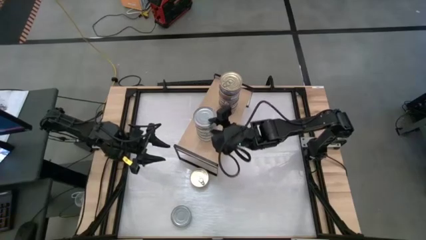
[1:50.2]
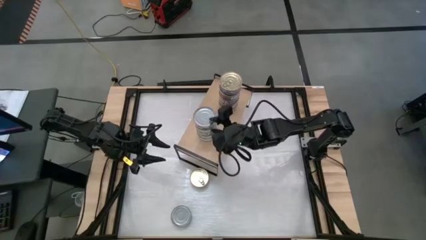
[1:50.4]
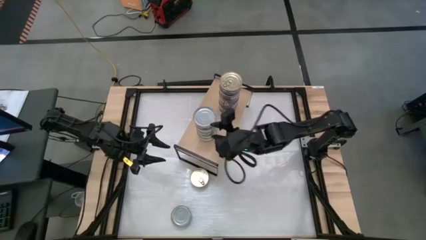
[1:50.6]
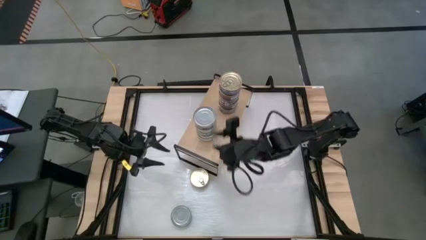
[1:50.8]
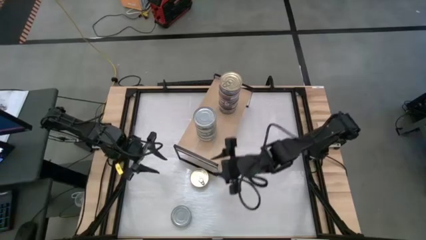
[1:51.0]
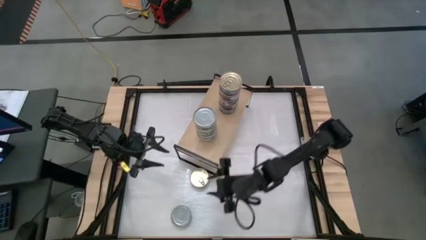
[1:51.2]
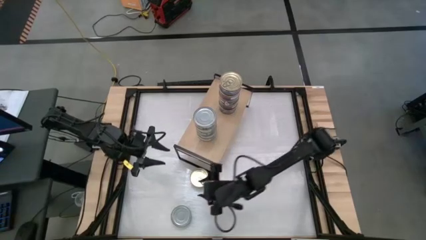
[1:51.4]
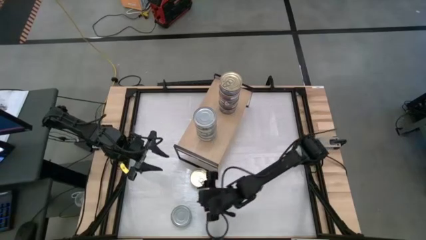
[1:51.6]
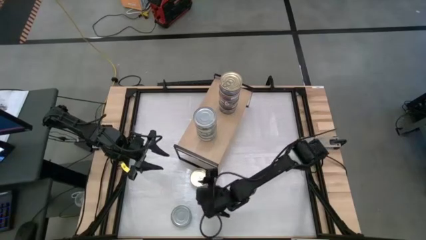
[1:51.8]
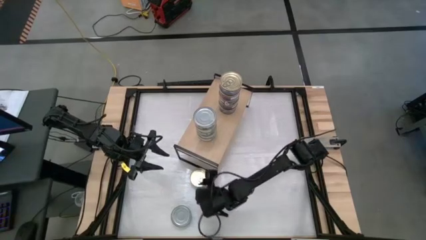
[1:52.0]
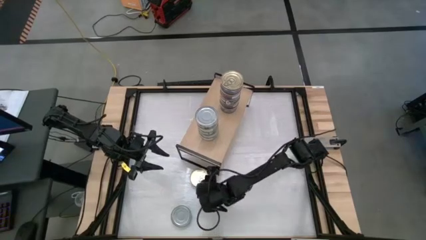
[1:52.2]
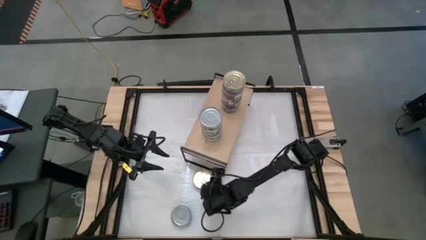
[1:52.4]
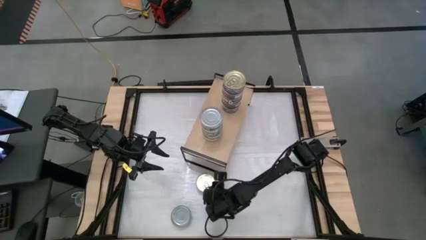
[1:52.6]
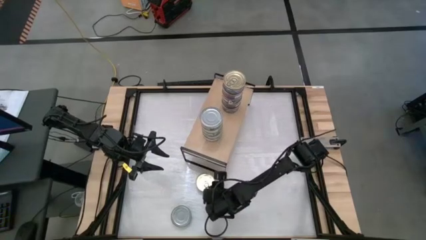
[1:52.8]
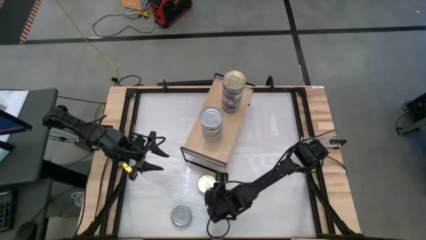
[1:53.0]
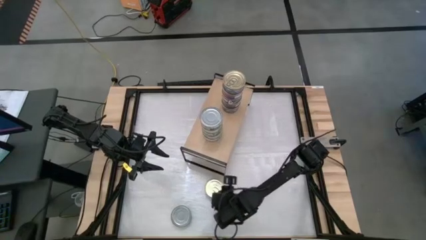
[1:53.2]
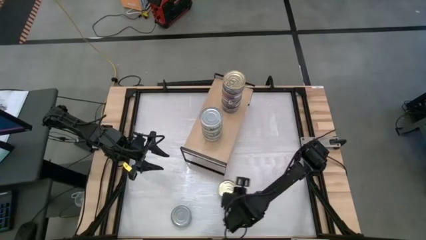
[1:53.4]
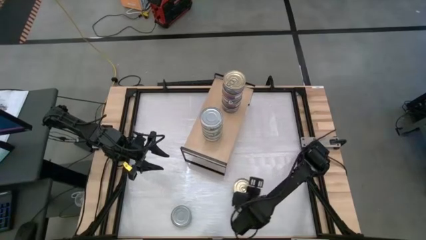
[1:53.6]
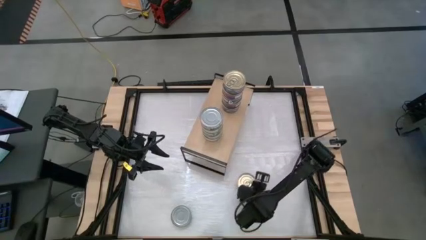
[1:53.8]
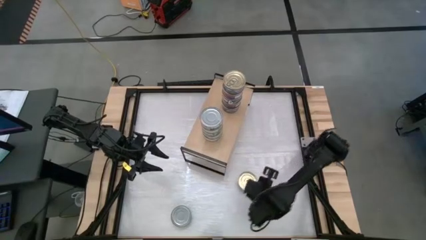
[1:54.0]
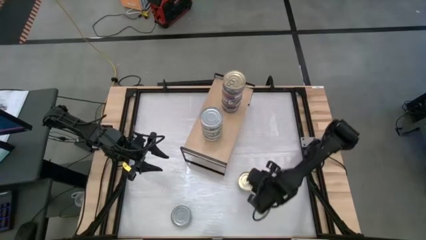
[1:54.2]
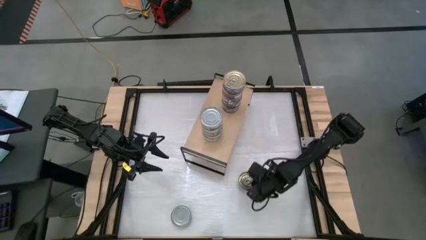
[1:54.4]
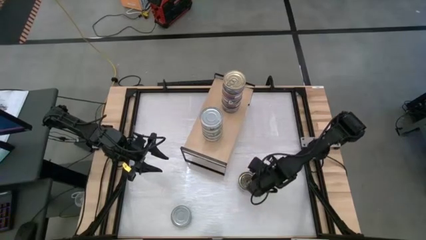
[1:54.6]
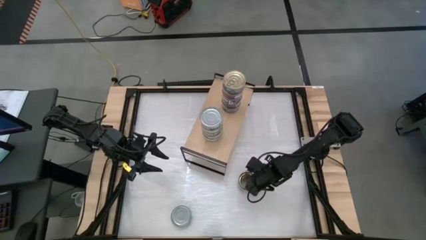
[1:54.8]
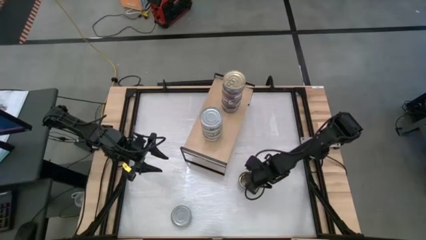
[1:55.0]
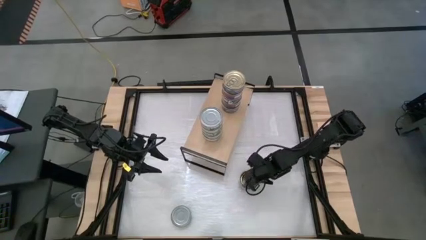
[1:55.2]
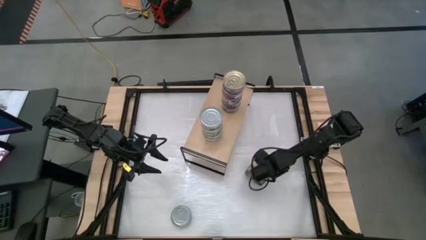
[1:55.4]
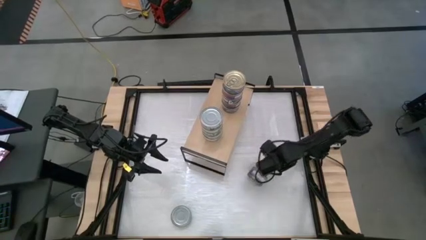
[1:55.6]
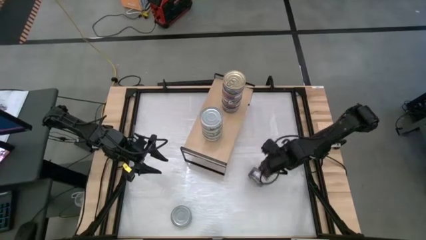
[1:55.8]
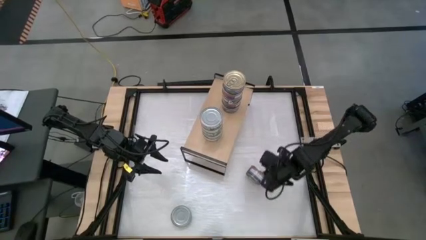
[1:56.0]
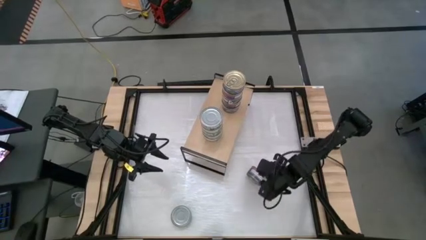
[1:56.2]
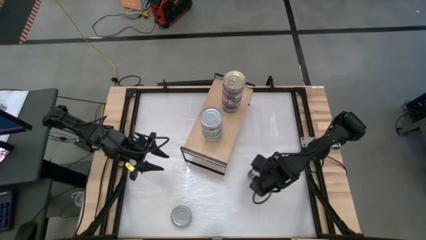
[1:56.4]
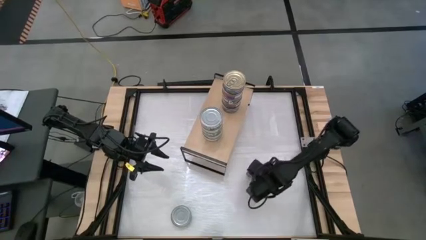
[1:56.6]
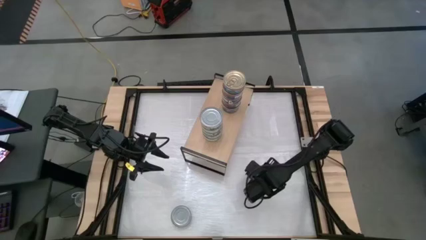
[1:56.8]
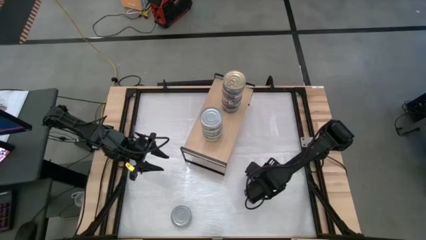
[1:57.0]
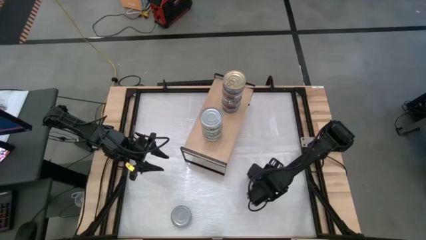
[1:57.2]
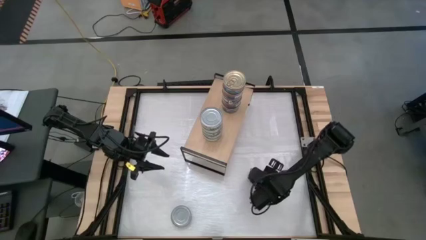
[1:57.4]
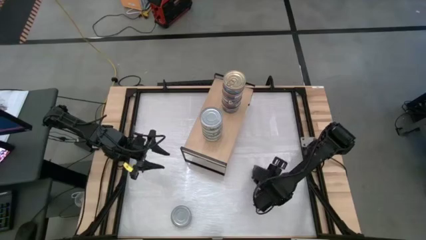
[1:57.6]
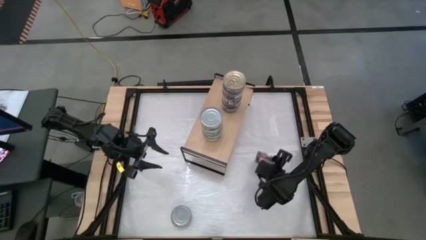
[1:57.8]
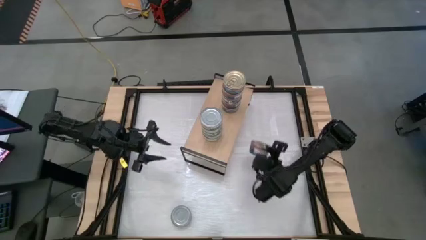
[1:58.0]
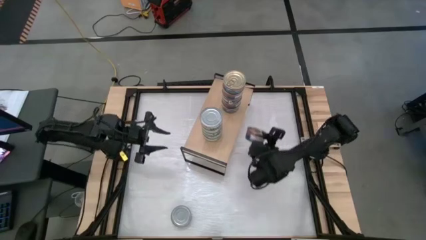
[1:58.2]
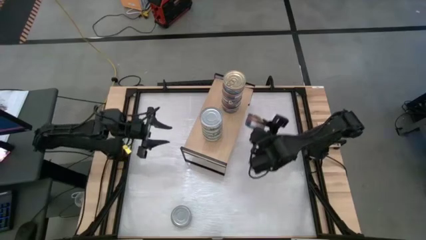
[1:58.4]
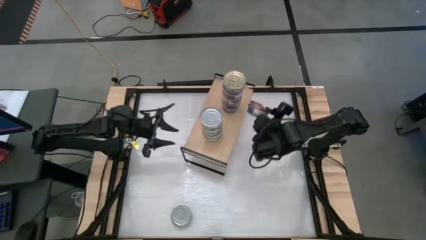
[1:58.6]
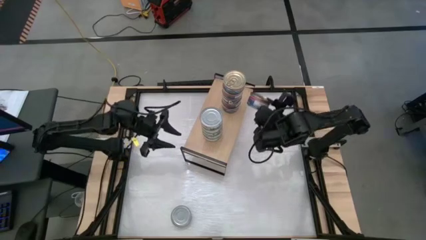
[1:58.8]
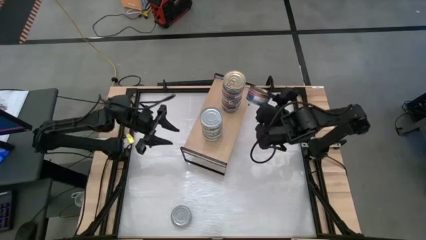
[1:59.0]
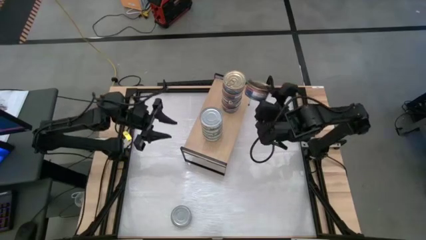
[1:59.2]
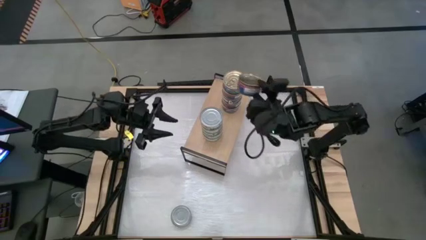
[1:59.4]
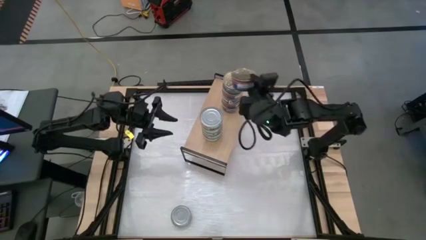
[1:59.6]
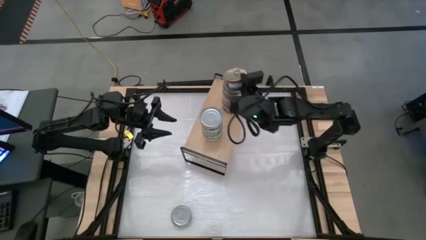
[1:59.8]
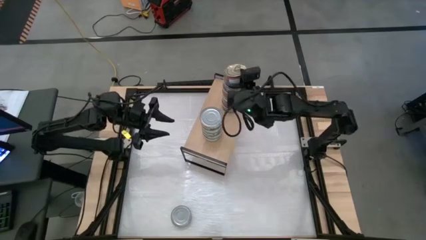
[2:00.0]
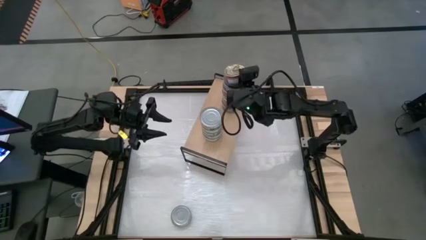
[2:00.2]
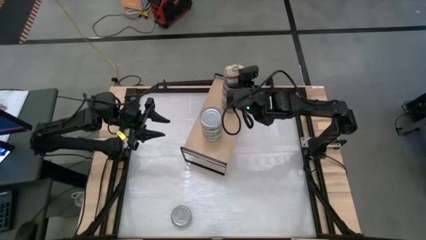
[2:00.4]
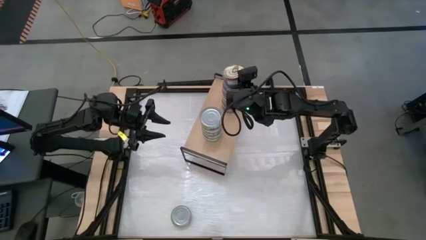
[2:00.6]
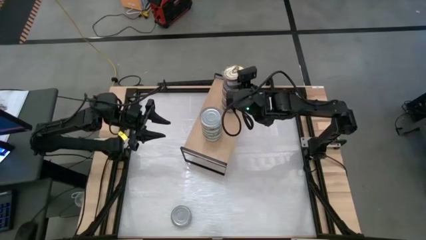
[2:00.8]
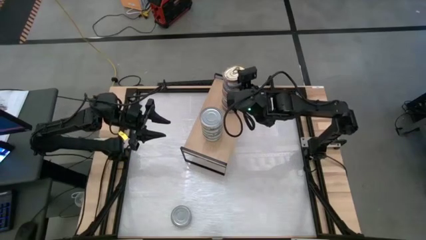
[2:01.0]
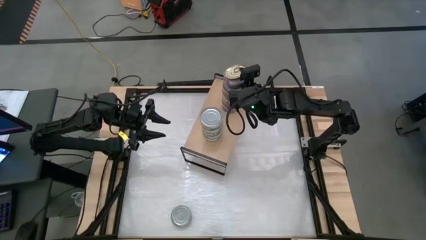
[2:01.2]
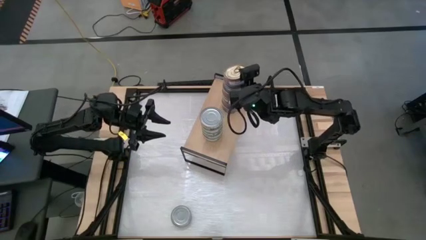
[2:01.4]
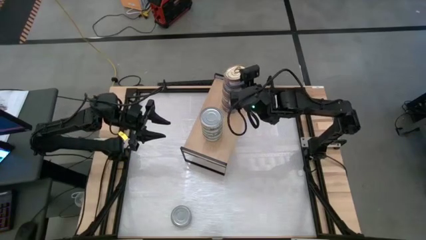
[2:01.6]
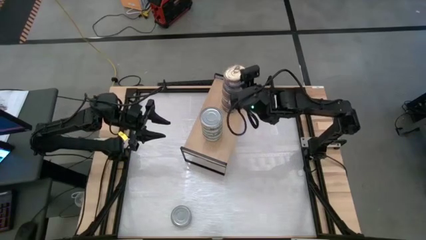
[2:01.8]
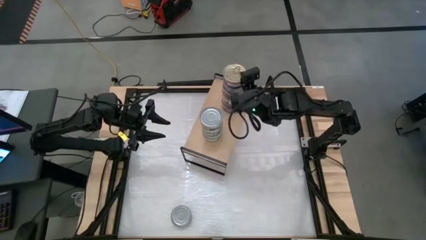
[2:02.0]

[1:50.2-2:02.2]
Task: Stack canned seafood by type on shelf
Stack the blue tuna can on top of the stacked blue tuna can on the shelf
